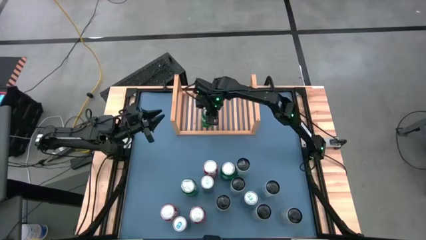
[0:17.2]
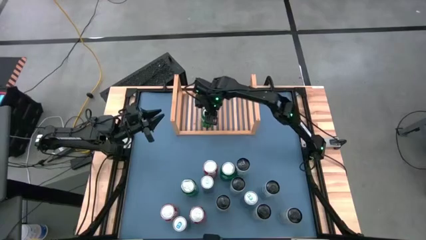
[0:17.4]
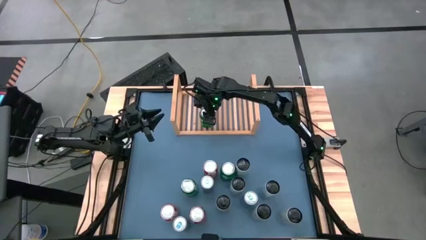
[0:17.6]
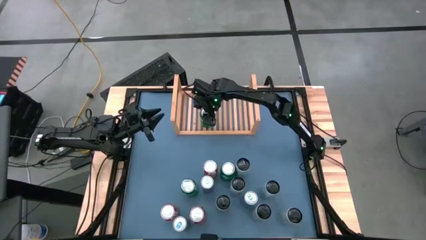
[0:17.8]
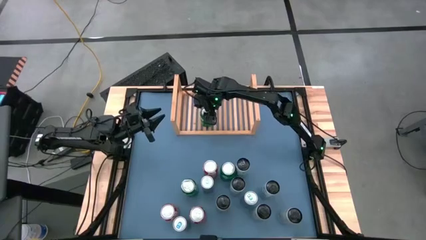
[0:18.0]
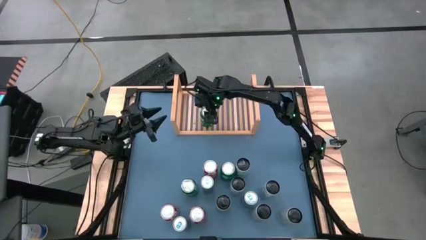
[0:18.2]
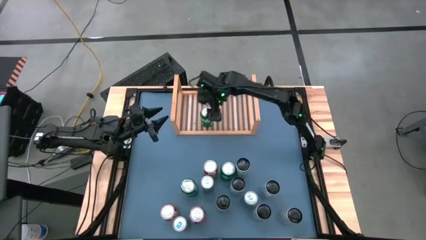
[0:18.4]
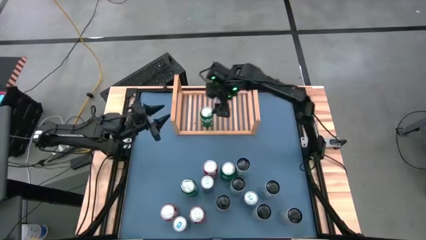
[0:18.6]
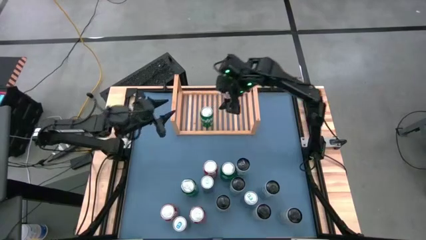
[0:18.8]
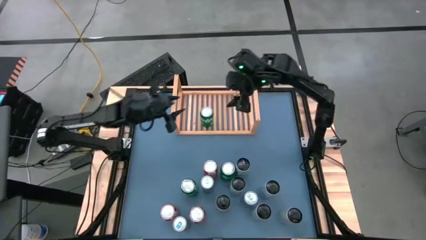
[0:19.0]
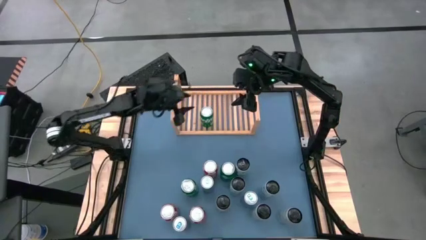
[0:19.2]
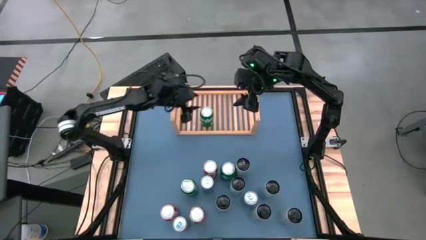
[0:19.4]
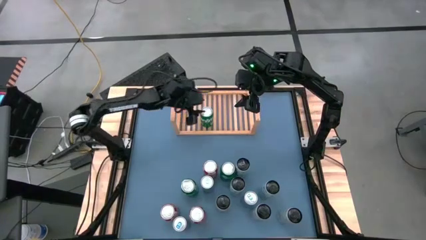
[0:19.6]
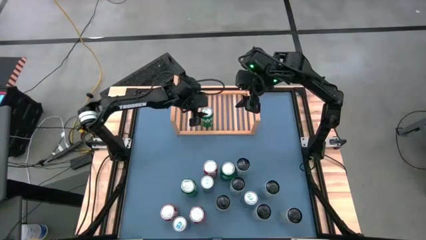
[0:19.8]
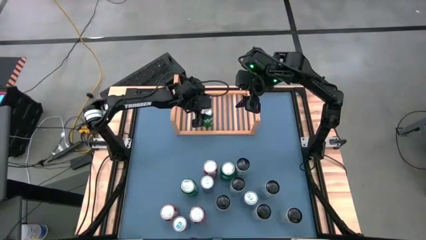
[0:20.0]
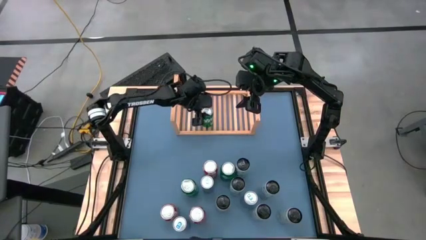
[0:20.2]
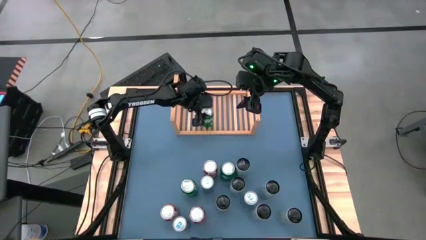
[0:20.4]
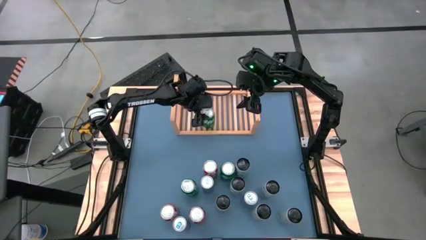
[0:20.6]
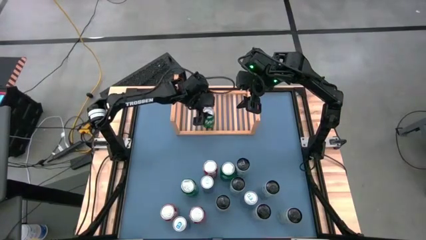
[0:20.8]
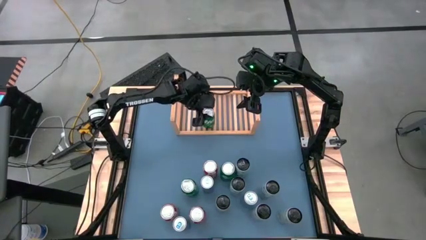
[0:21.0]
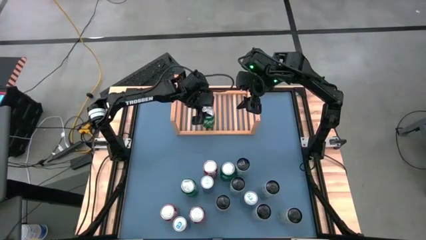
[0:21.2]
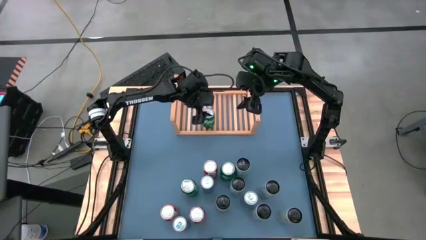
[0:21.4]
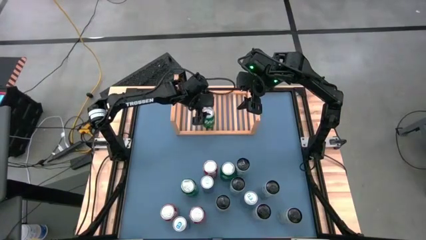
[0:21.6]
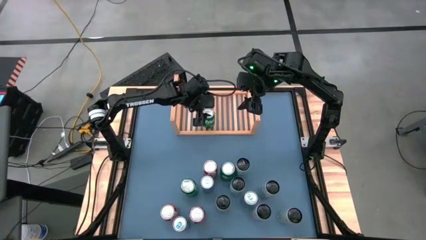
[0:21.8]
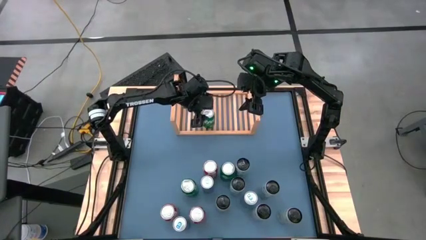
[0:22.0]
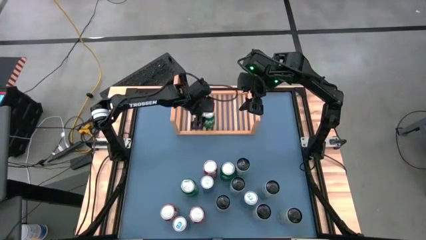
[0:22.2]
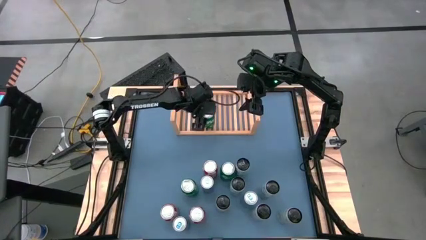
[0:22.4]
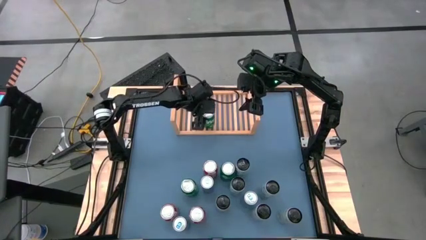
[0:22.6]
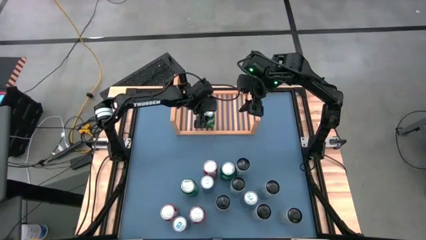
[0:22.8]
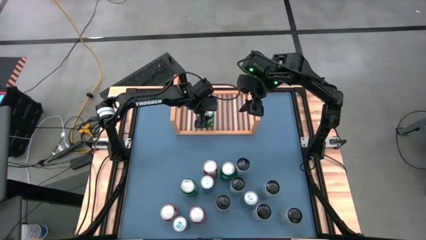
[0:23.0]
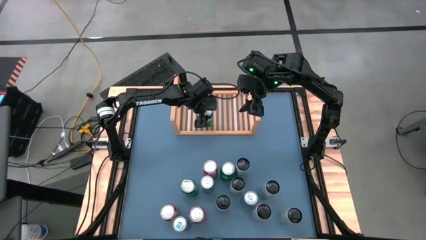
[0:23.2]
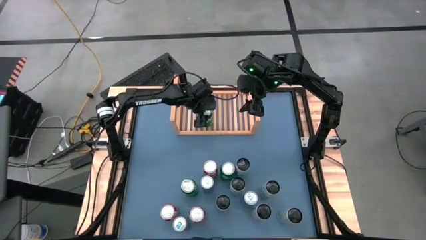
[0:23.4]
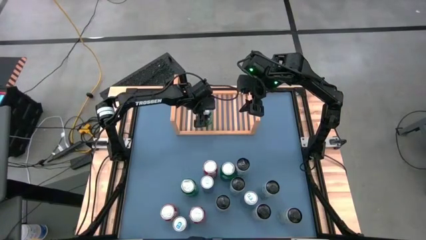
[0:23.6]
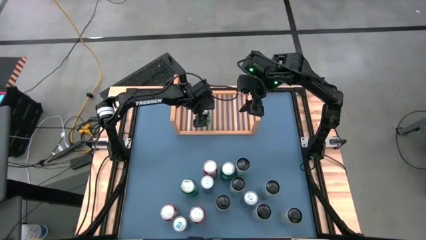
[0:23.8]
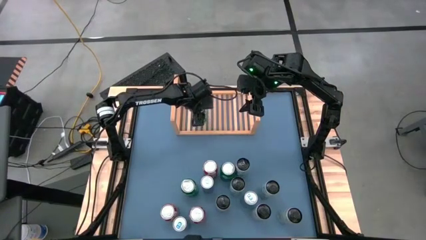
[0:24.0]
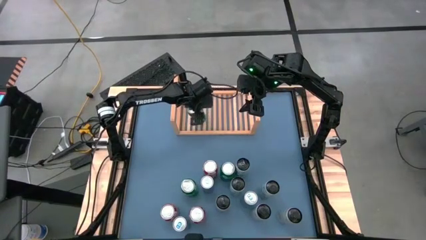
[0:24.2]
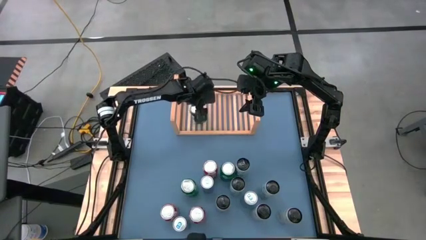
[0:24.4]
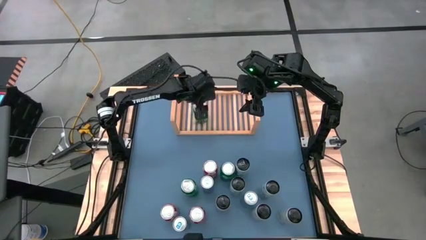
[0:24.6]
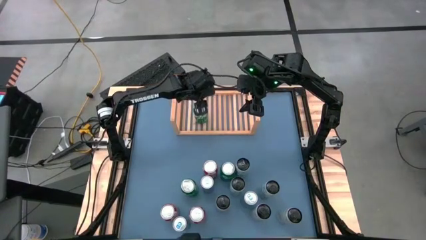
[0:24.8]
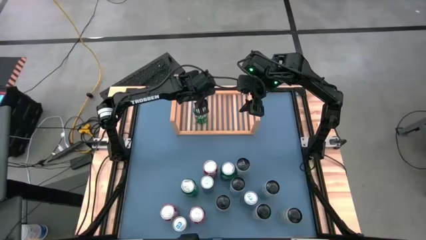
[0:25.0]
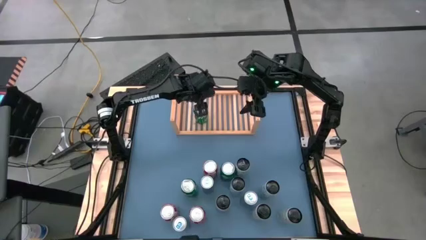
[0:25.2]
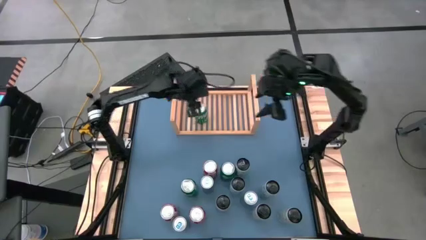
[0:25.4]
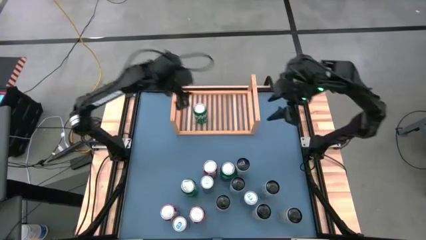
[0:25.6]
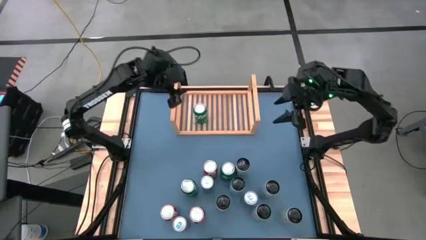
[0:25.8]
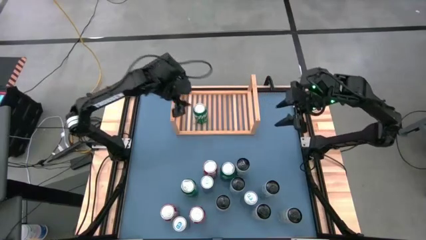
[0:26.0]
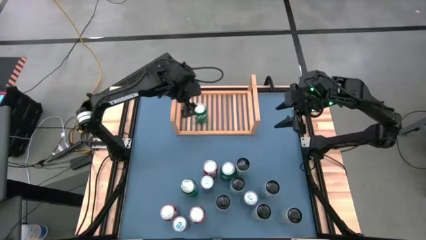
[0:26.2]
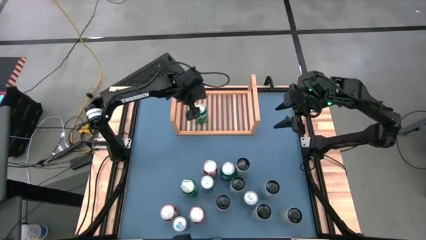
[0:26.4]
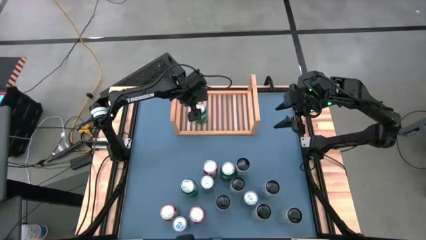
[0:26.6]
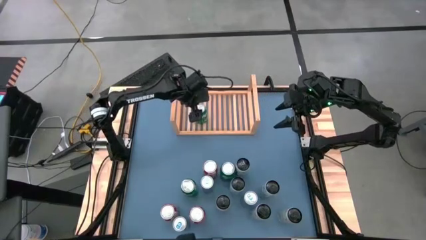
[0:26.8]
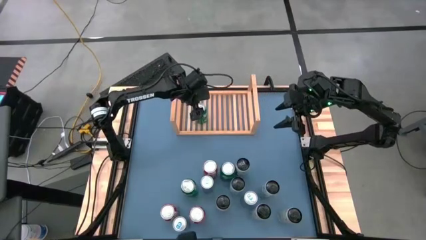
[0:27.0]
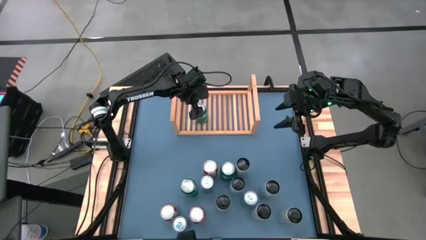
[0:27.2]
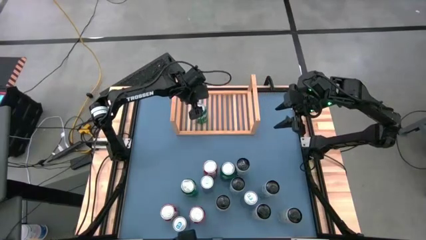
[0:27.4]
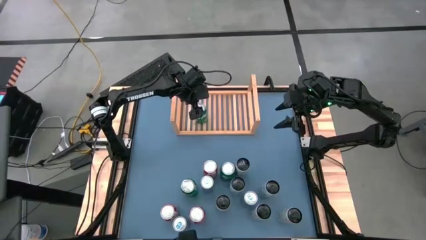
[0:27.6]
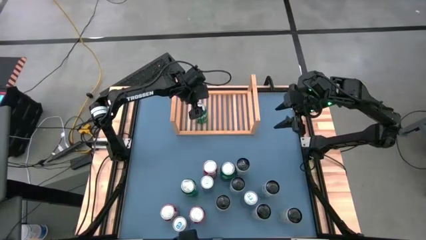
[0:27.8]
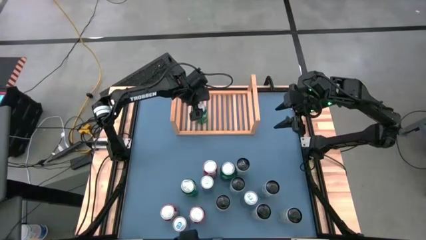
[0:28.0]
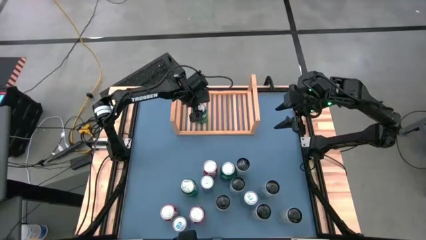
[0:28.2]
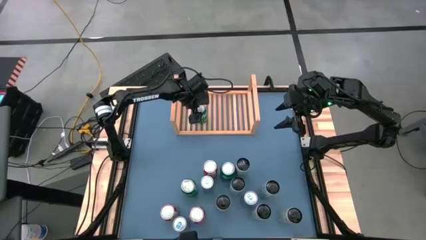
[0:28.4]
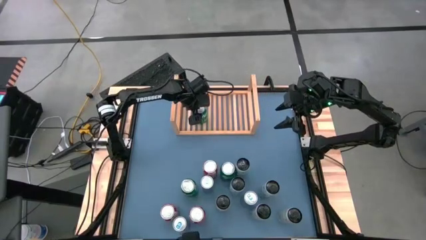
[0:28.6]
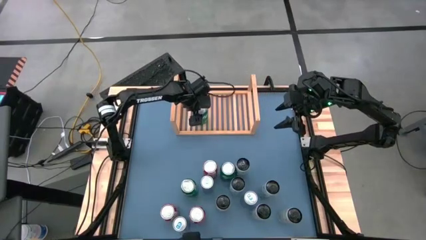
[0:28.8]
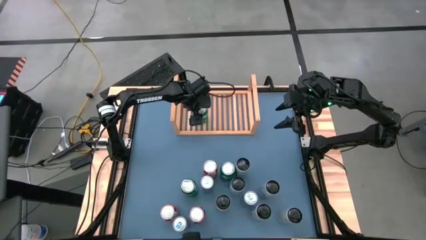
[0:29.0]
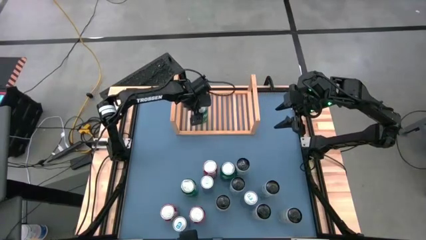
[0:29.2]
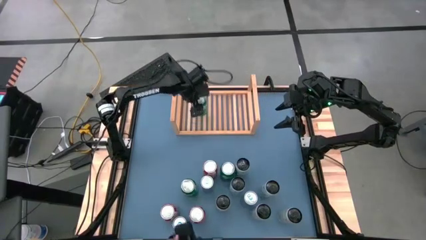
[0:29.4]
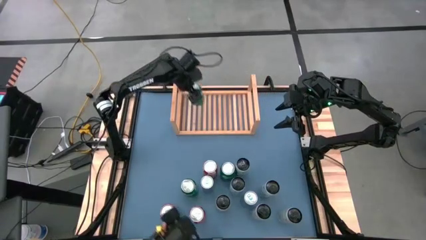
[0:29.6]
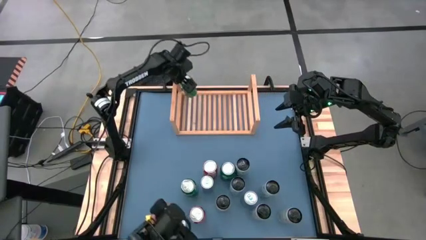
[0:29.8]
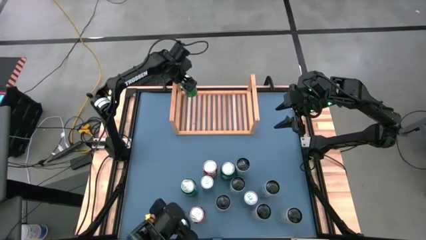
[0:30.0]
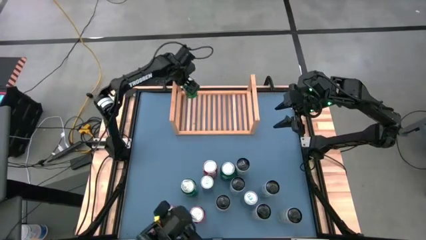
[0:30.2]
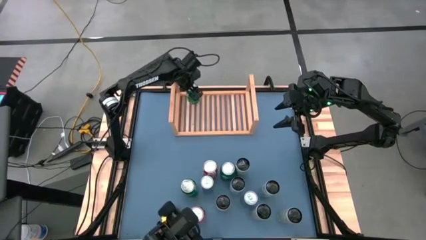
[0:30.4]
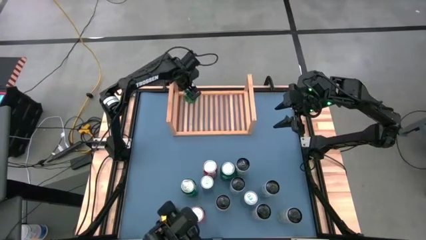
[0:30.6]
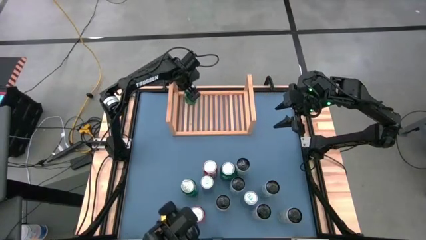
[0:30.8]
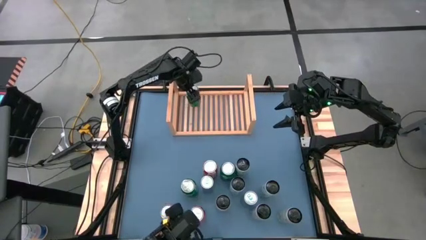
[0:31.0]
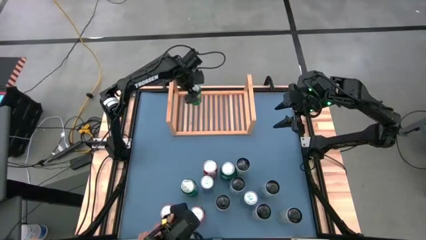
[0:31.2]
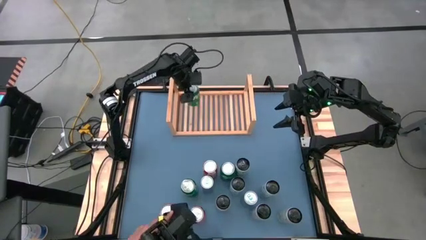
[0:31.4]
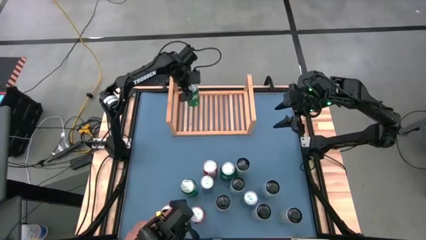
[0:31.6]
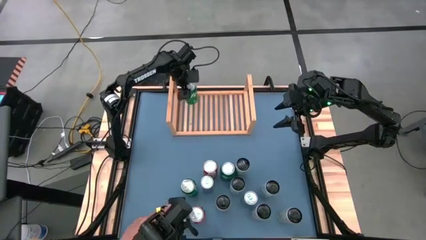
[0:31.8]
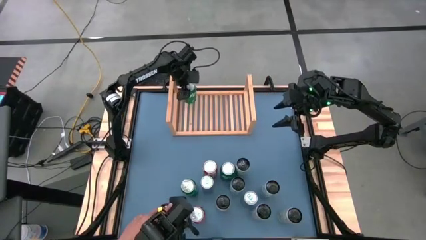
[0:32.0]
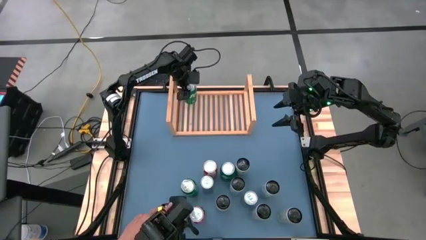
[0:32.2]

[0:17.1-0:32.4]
Task: Place canned beverage on shelf
Adjust the green soda can on the shelf
